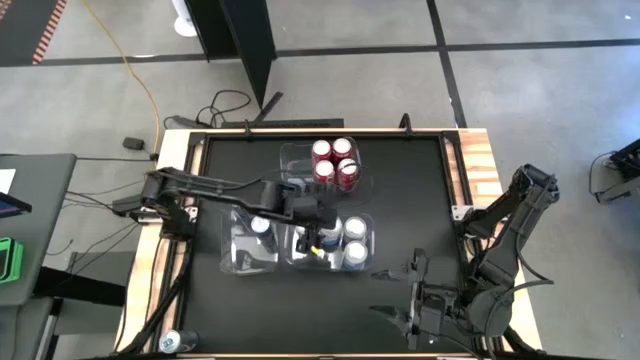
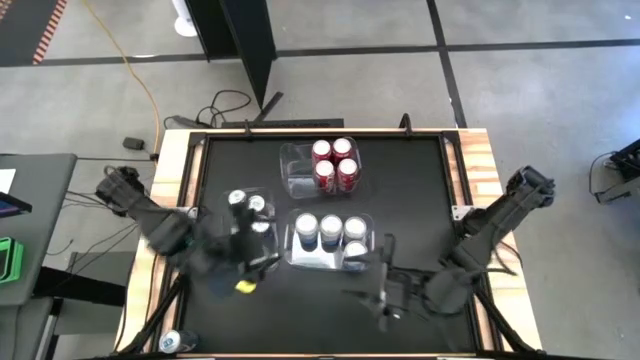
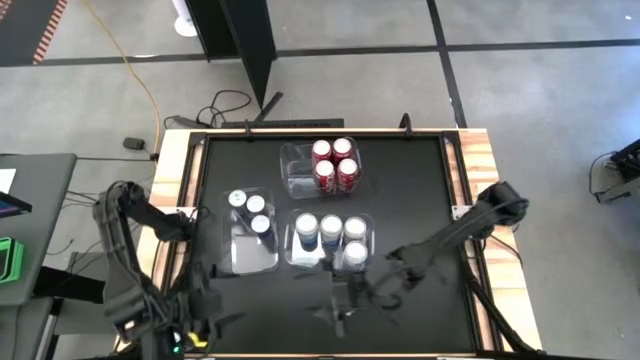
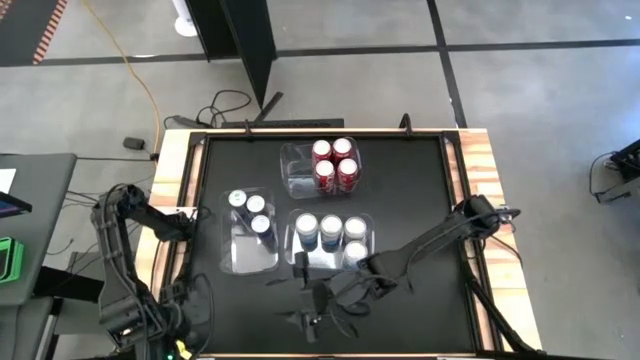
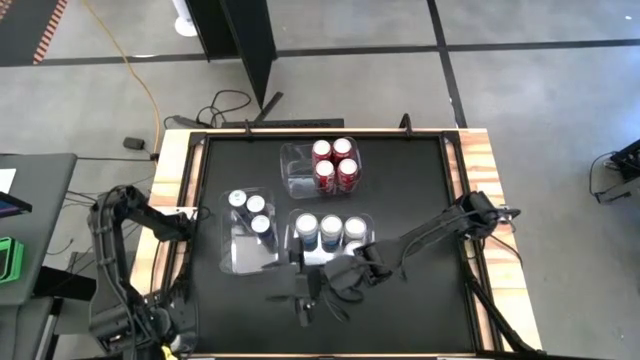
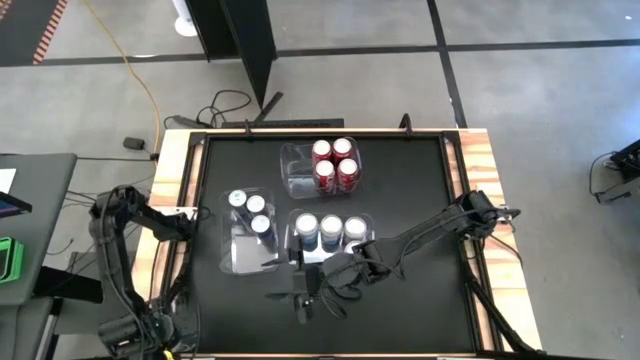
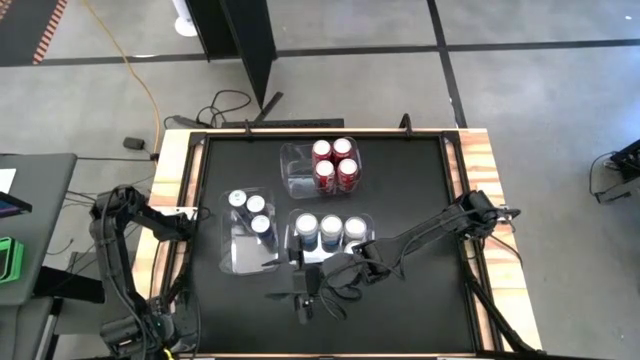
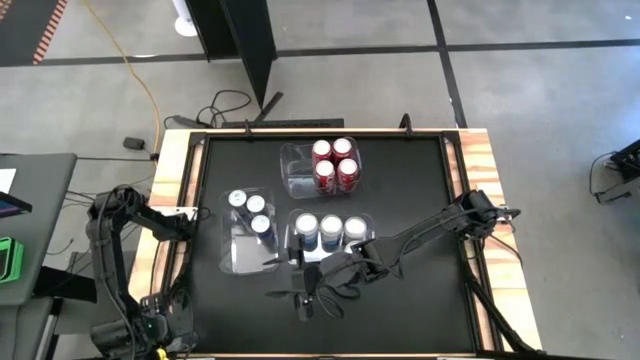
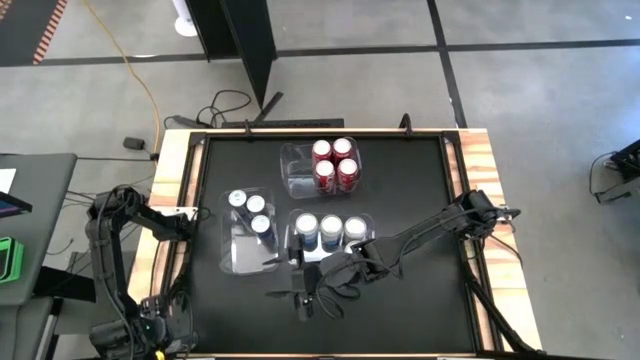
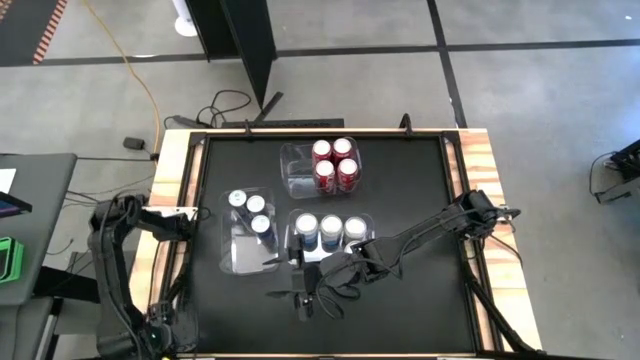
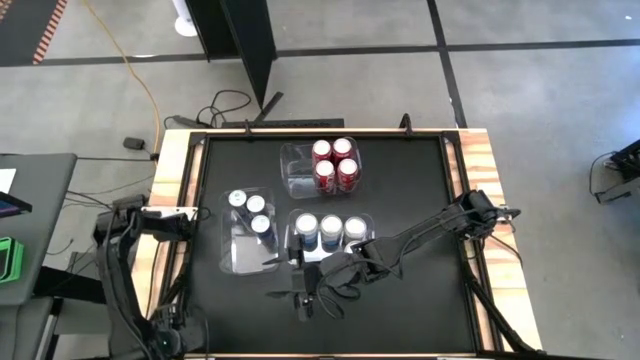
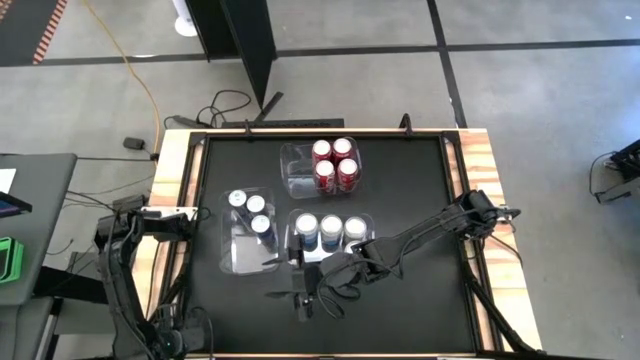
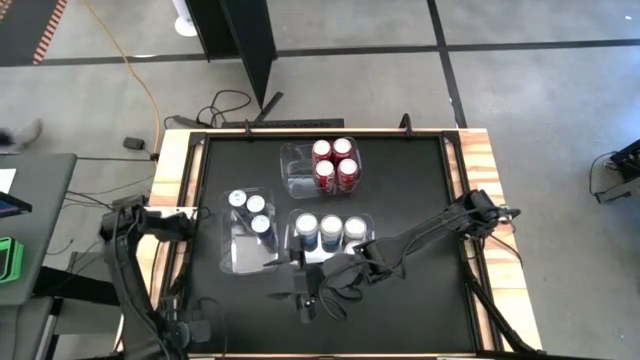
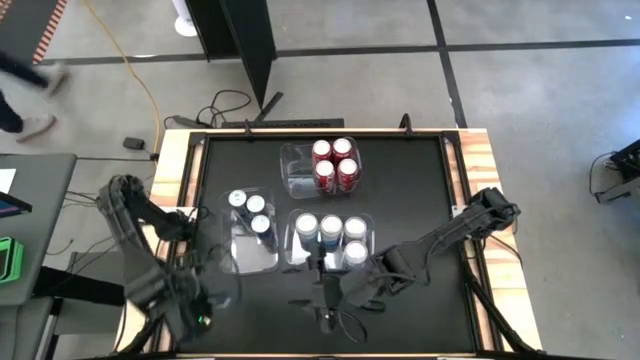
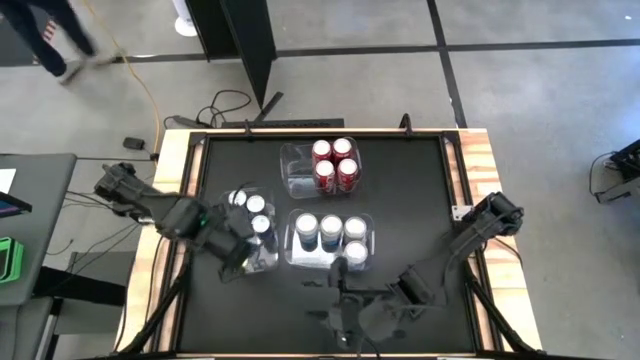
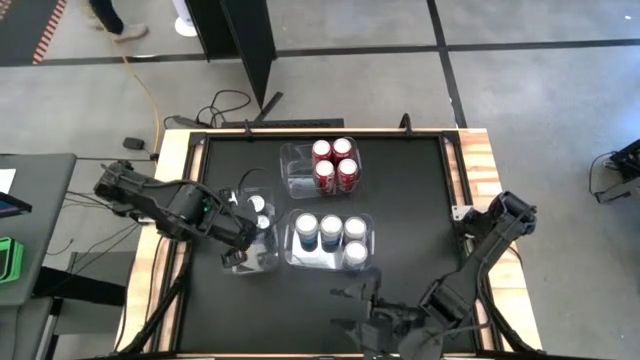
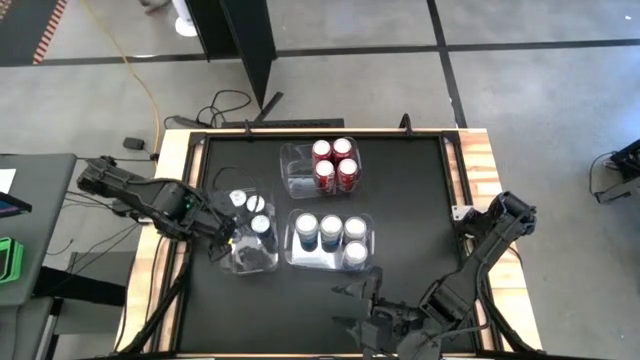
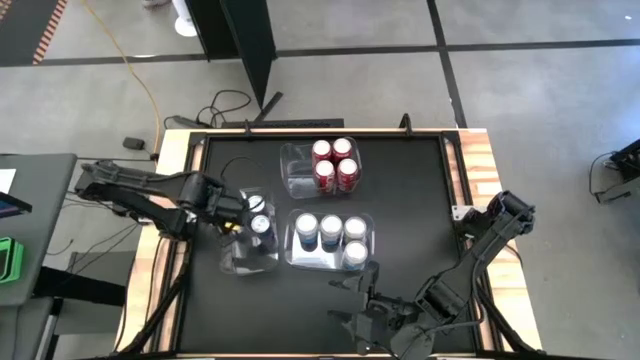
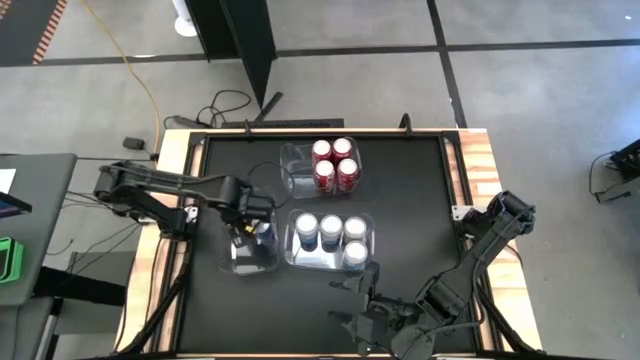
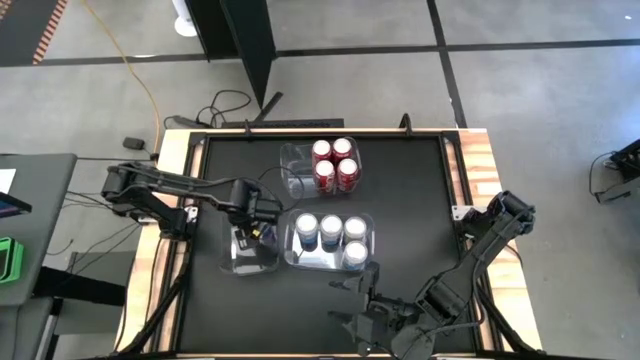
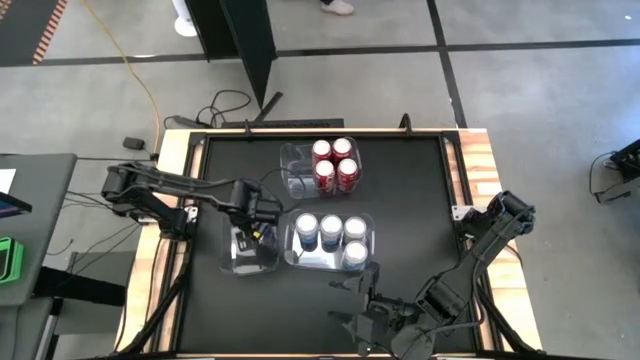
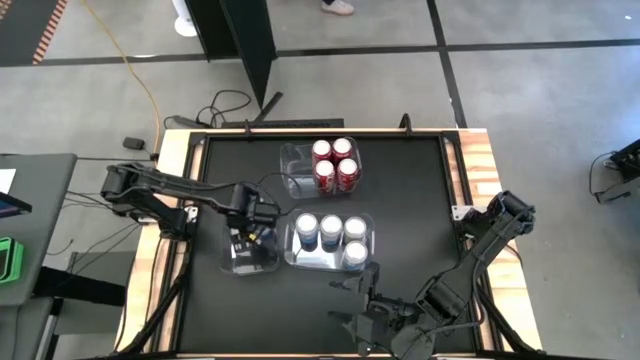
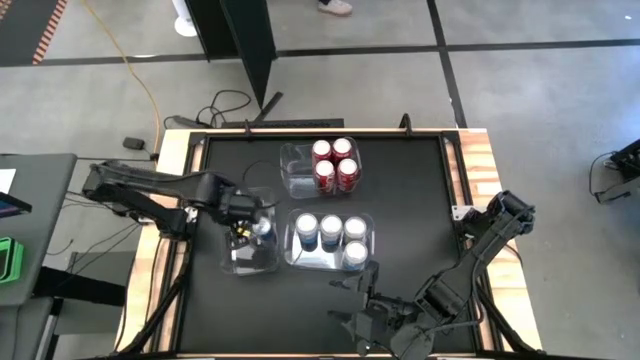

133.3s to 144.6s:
Task: Sort soda cans
Put the blue soda can into the middle left transparent bin

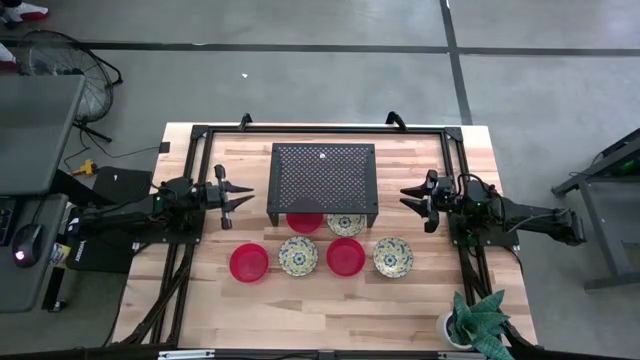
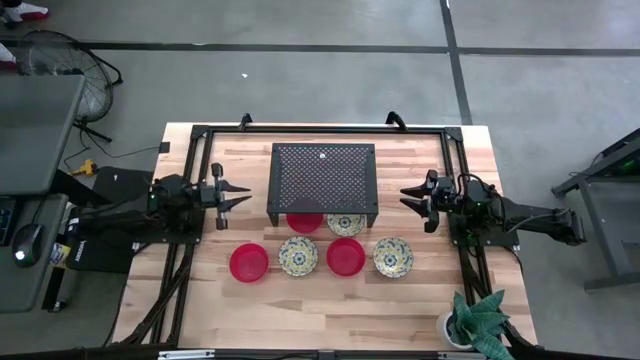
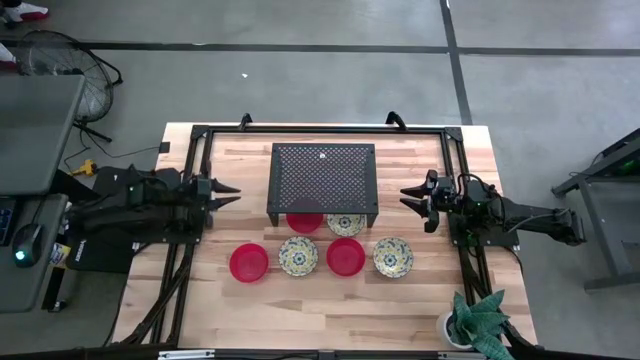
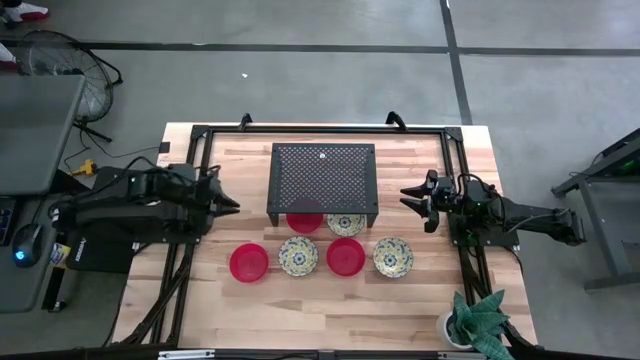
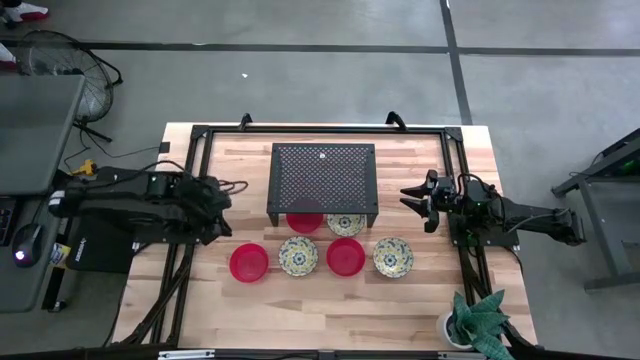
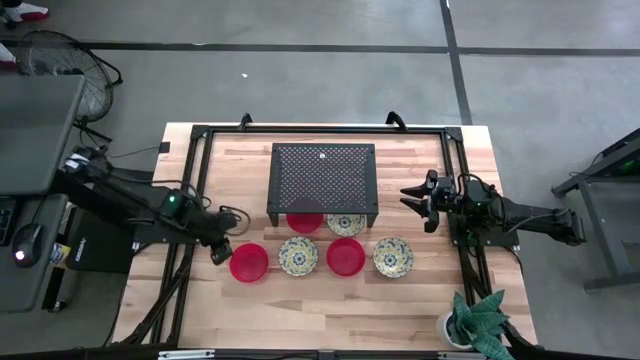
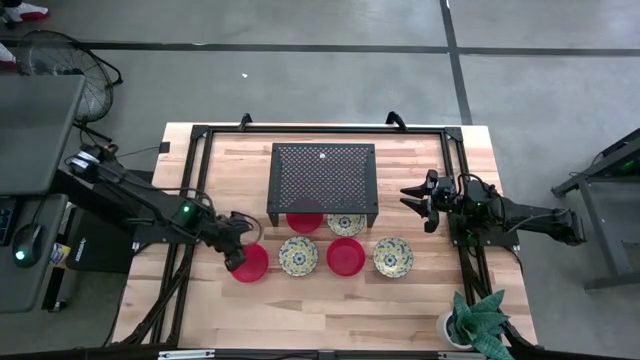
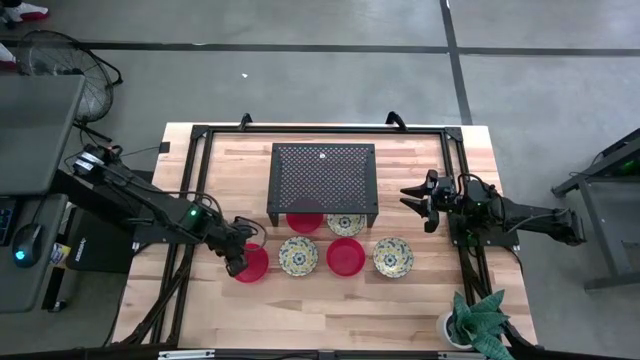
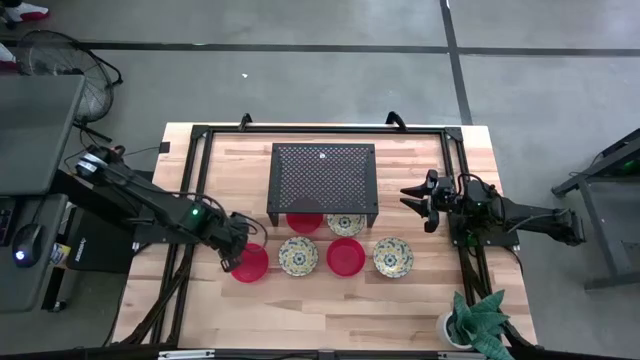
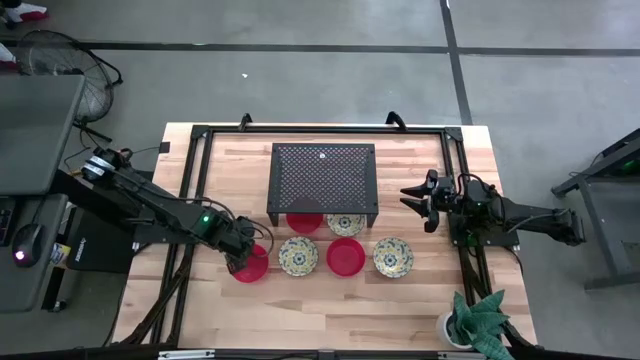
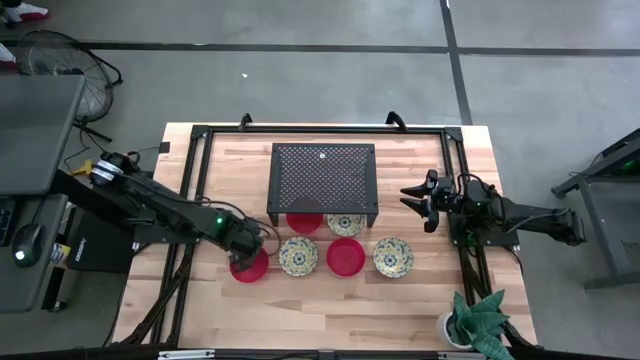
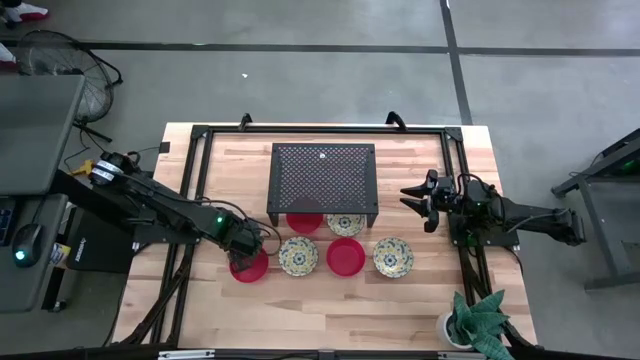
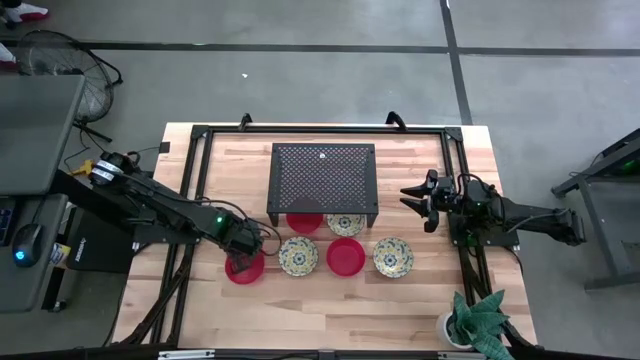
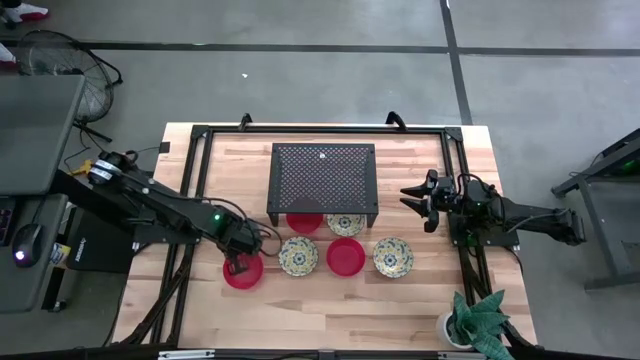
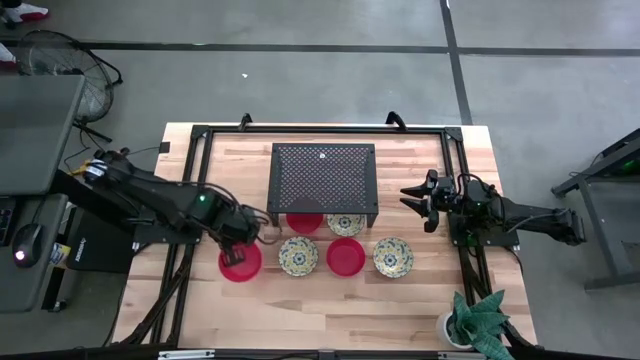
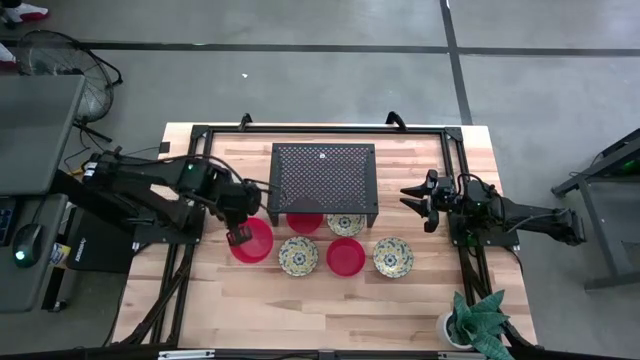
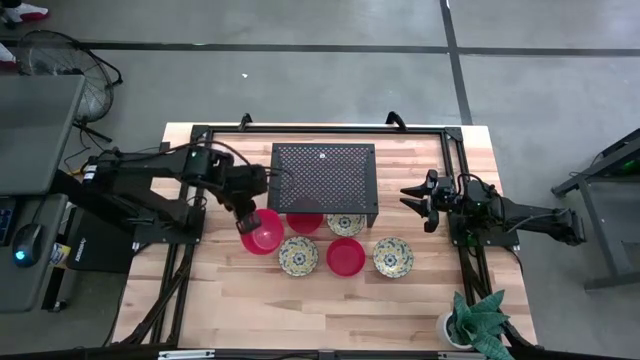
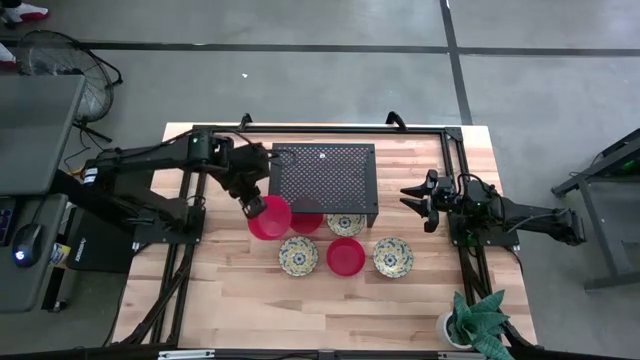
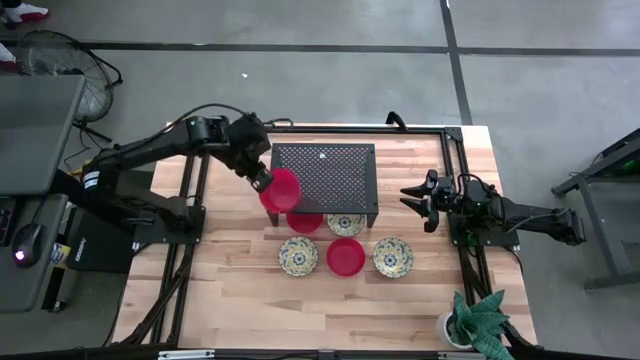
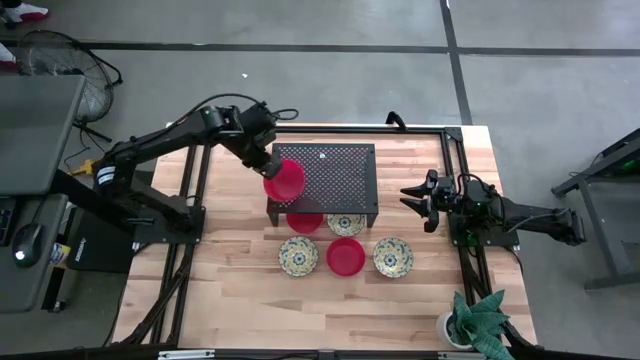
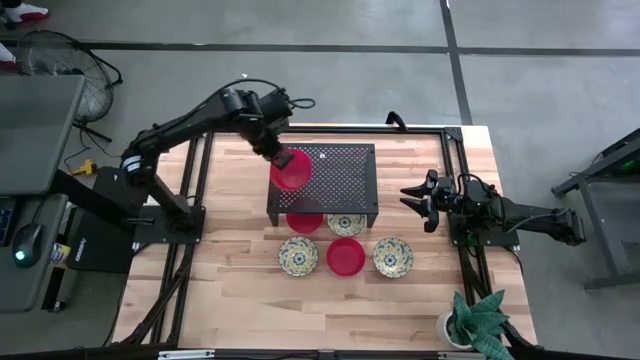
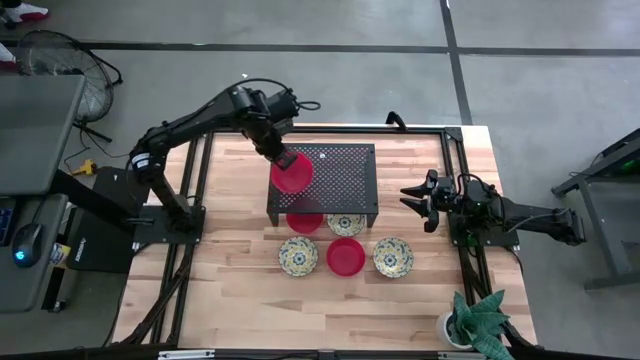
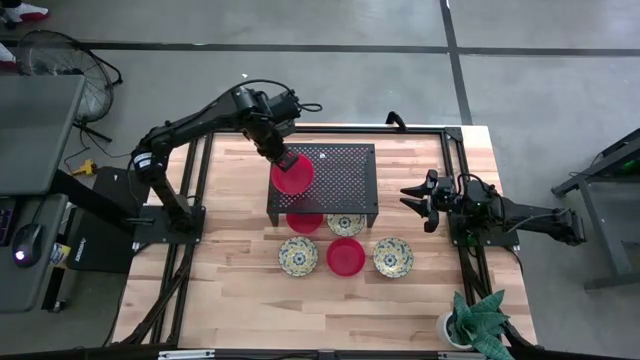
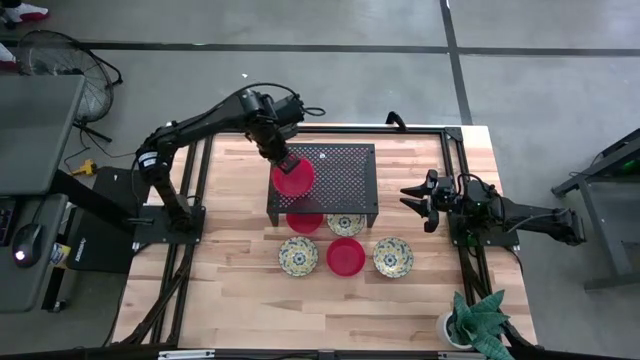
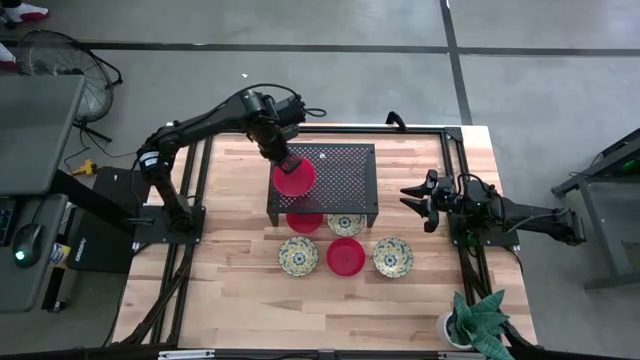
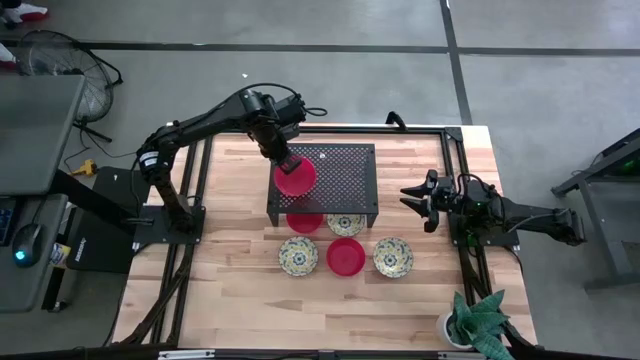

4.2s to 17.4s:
Task: Pick & Place Mini bowls
Put the bottom left red bowl on the shelf
